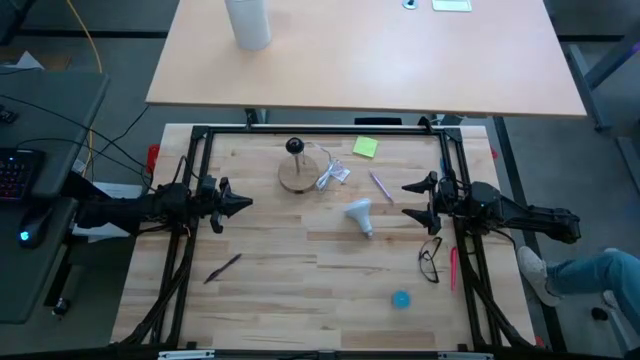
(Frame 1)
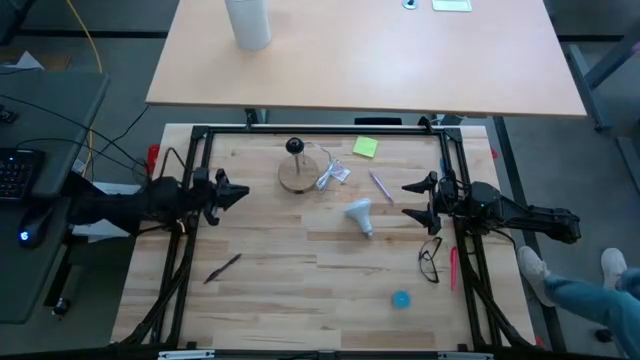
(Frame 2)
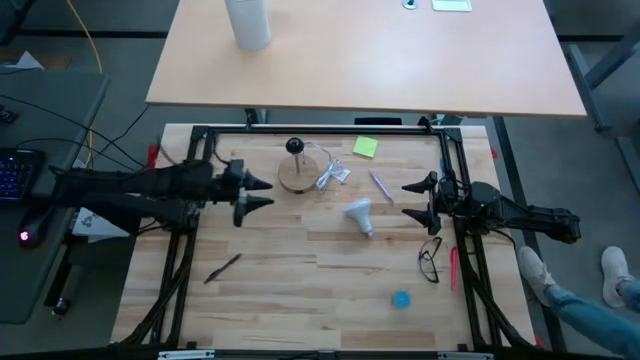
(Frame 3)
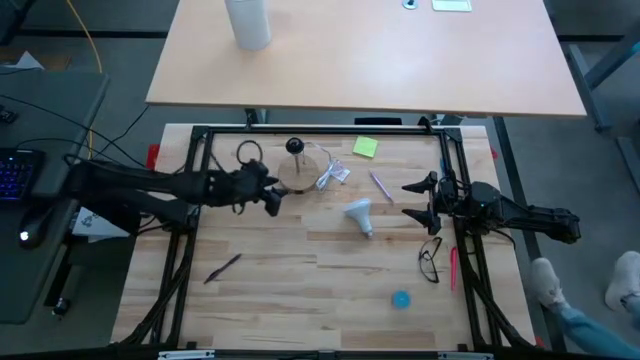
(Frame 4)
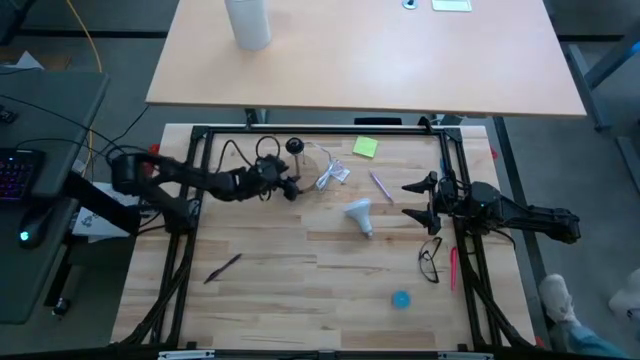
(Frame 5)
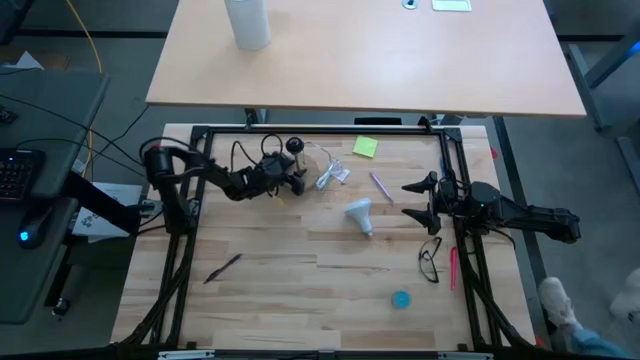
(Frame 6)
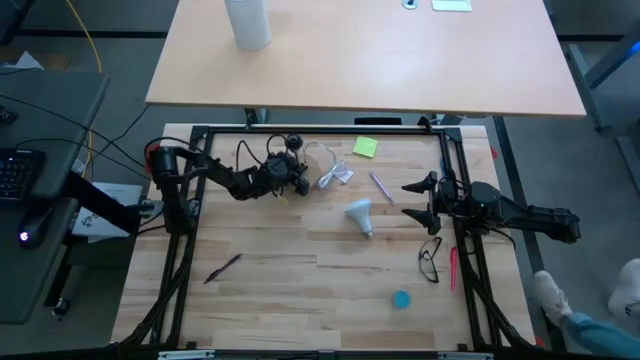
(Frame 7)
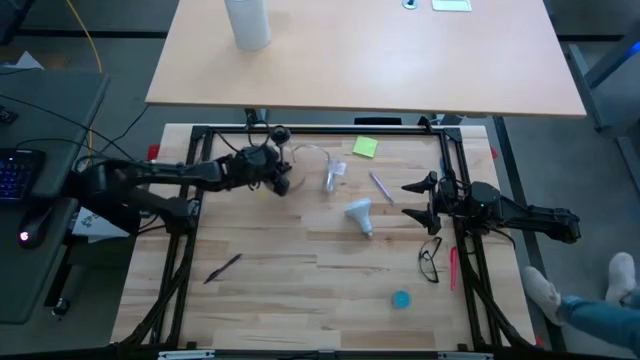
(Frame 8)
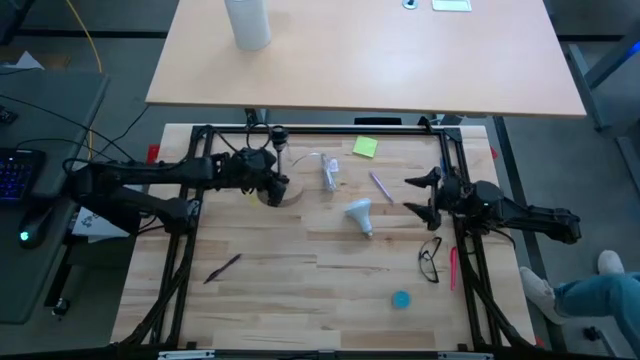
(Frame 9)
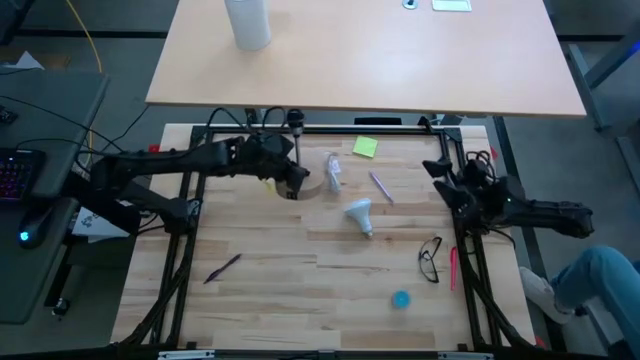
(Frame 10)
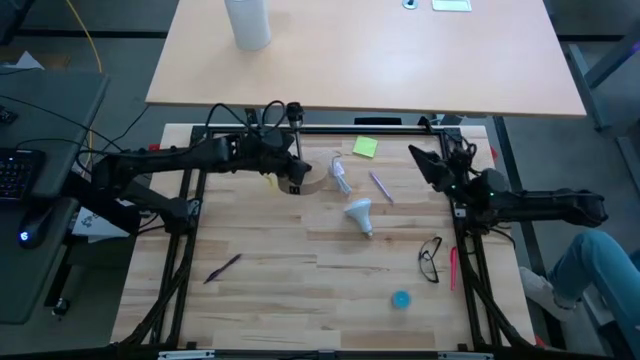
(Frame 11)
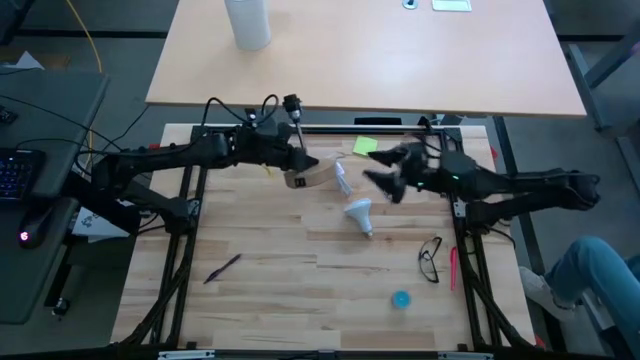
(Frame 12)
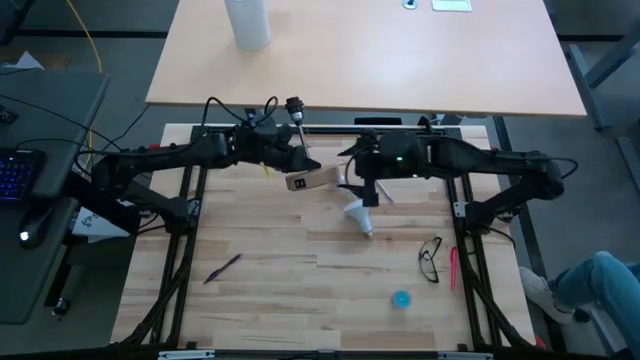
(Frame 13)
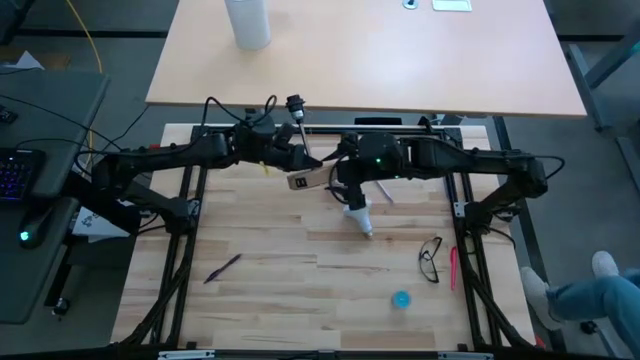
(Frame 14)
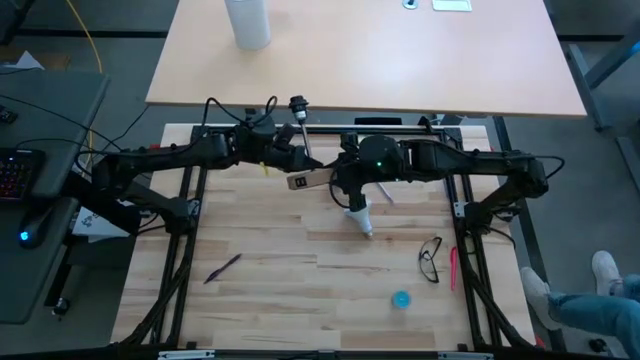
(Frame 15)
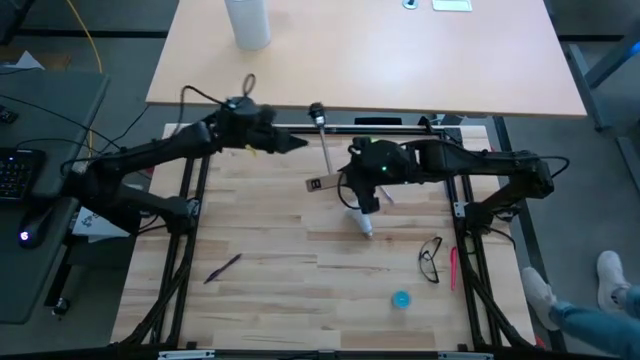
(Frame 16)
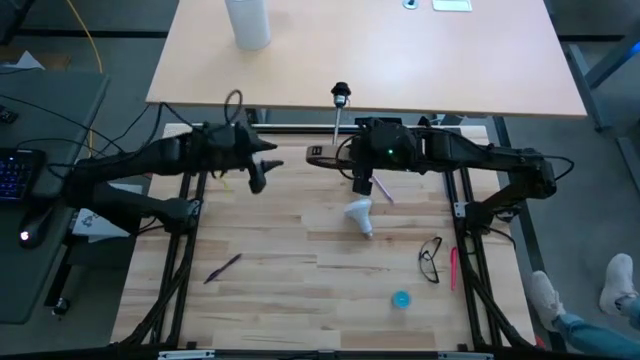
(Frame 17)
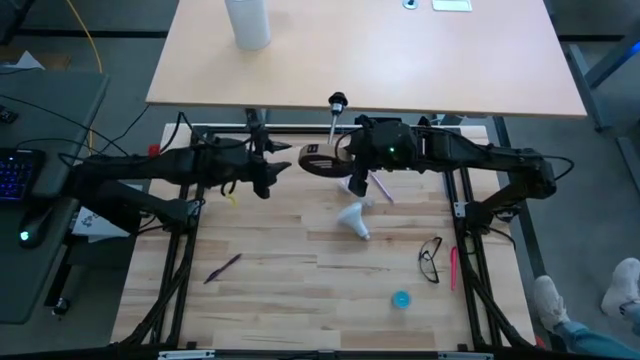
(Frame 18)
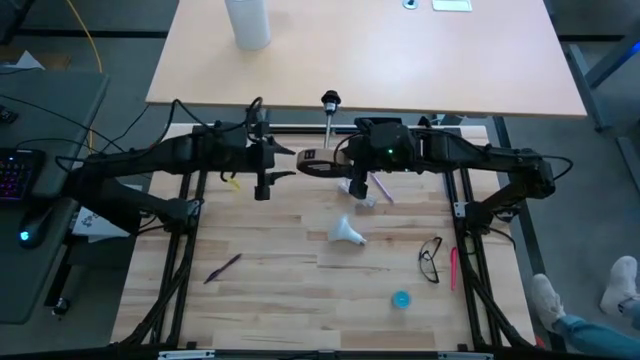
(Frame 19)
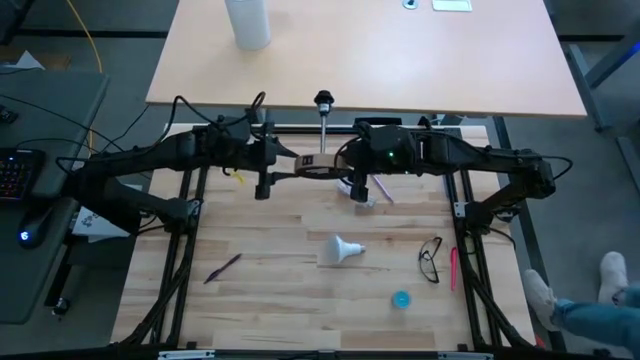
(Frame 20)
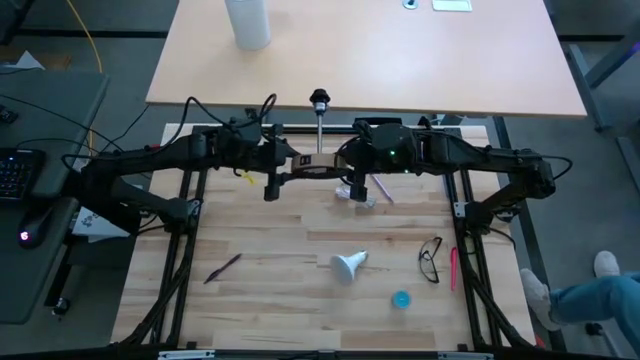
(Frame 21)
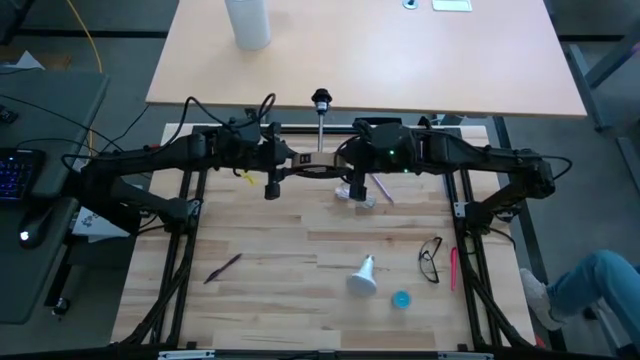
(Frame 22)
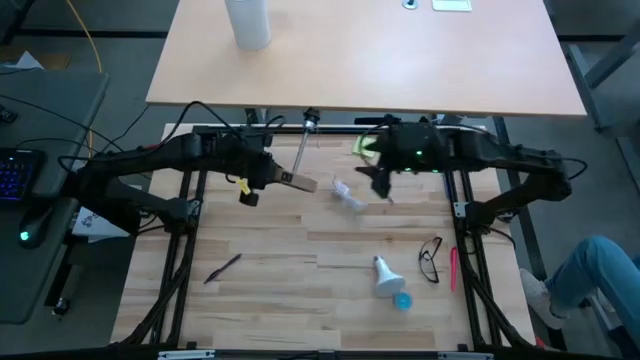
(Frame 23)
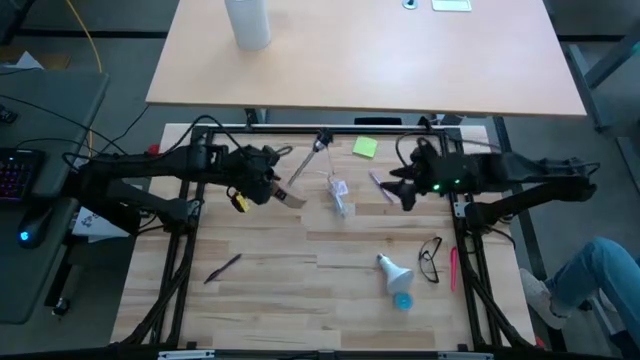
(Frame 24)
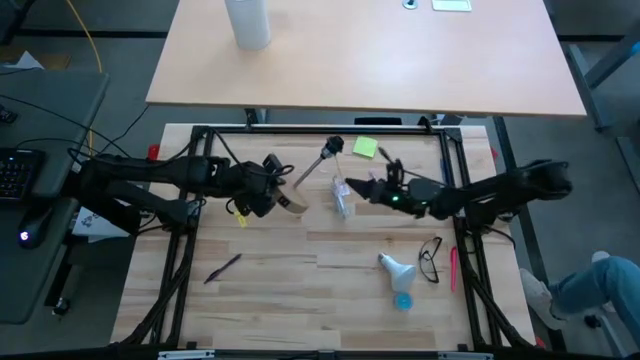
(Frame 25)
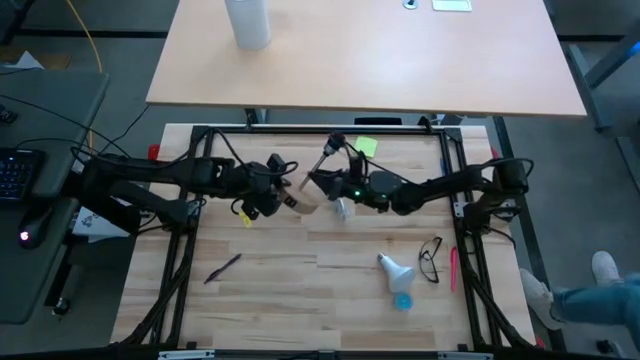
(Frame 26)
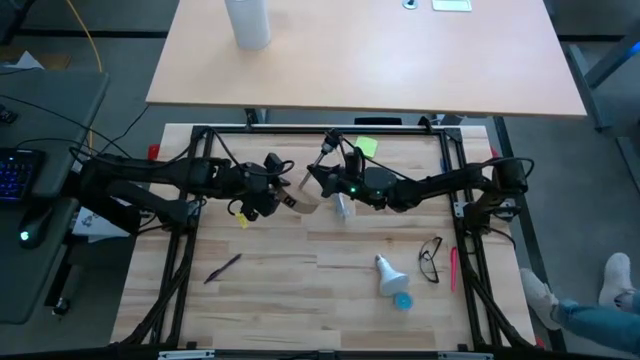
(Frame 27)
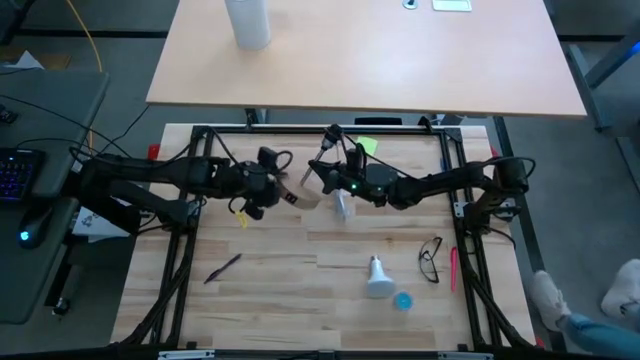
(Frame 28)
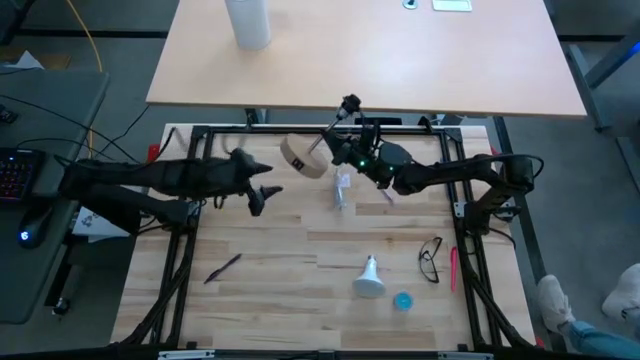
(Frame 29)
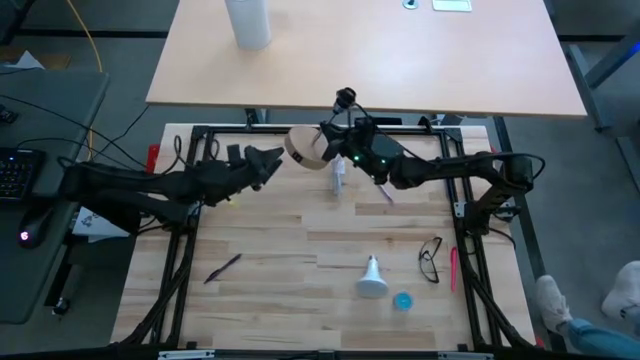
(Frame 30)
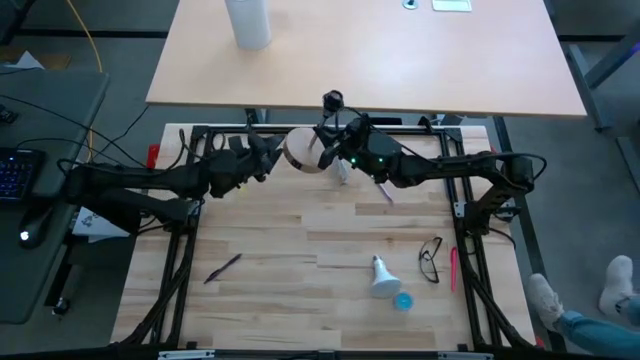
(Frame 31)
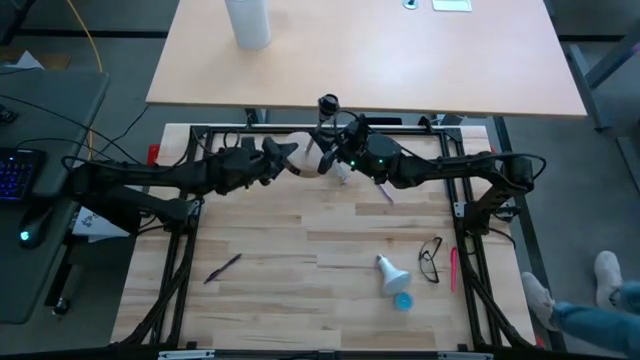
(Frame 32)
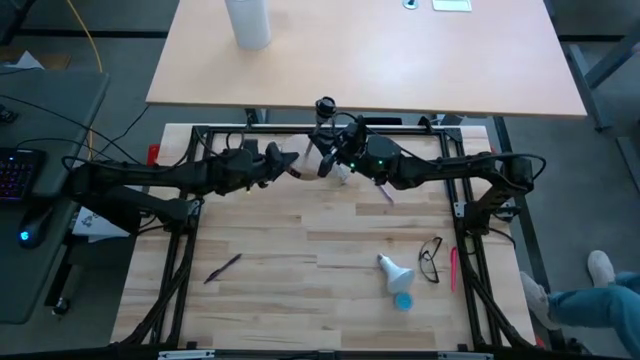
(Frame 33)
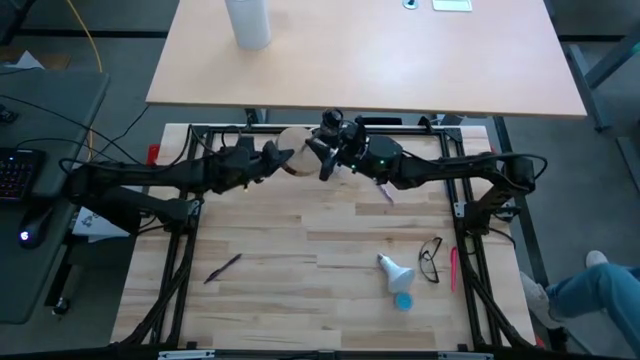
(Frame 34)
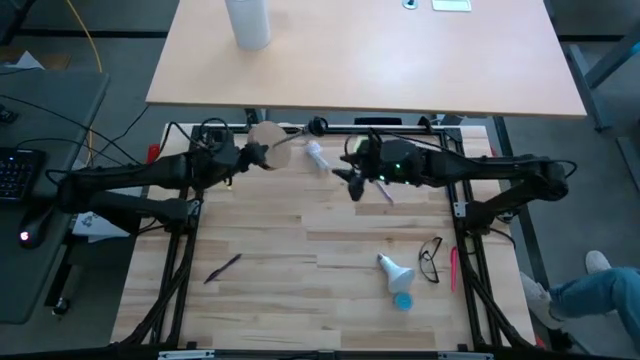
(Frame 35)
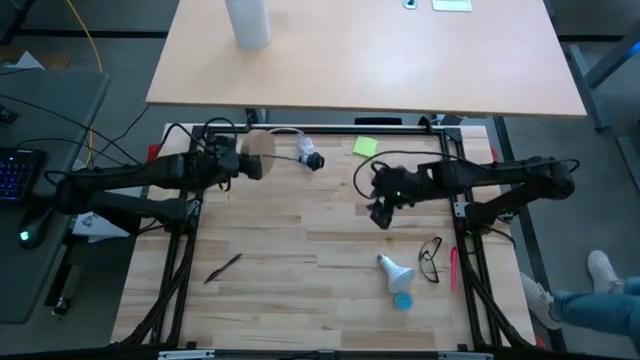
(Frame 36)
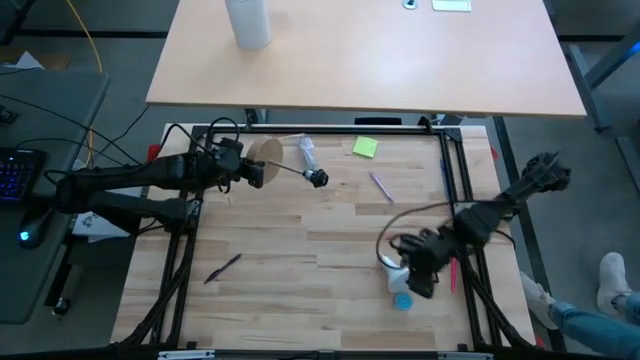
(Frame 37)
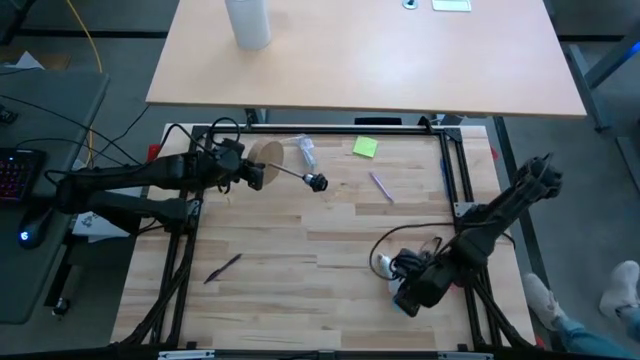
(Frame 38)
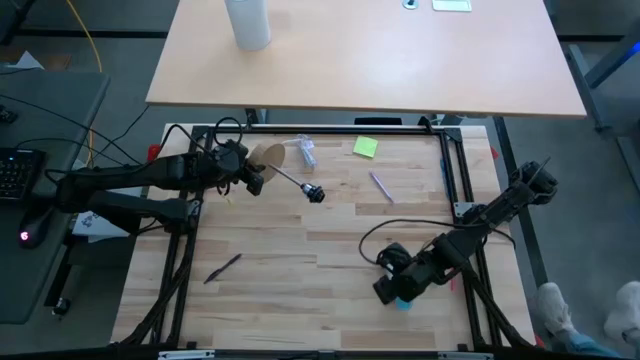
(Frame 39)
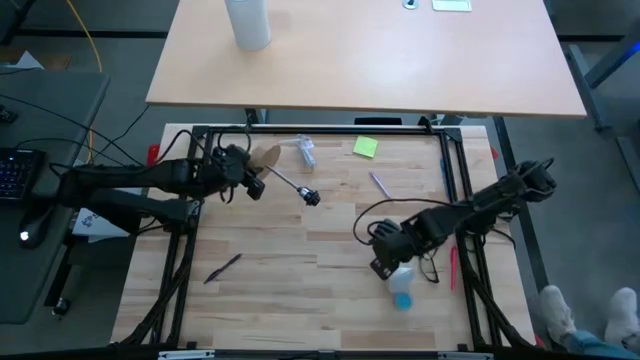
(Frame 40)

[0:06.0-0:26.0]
Task: Screw lightbulb
Insert the light bulb into the lamp
